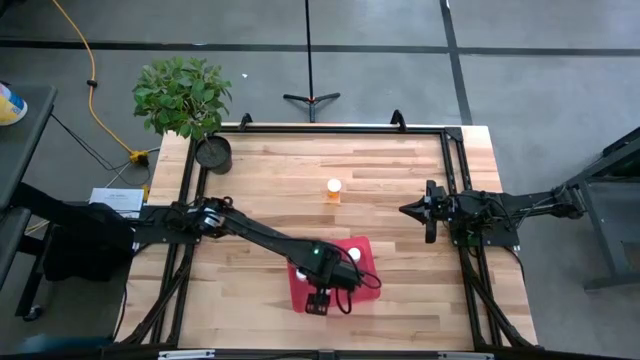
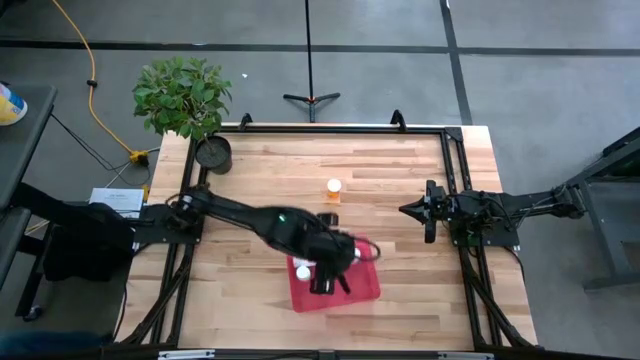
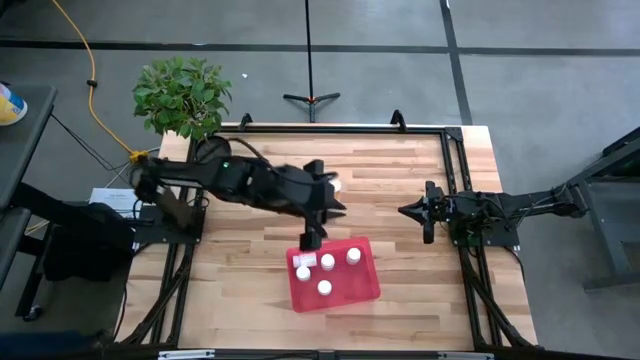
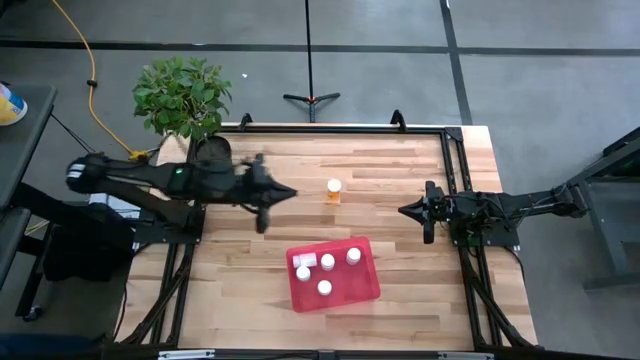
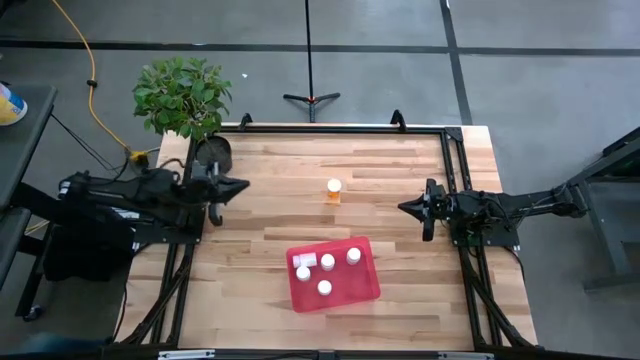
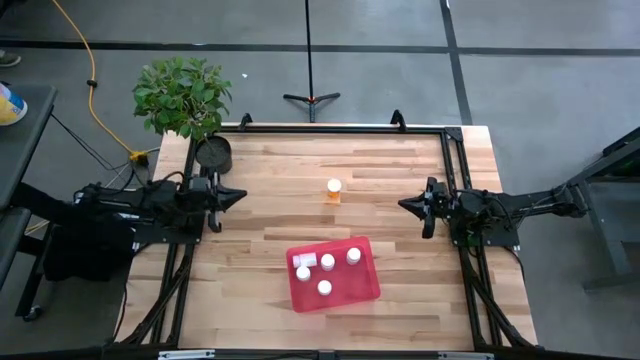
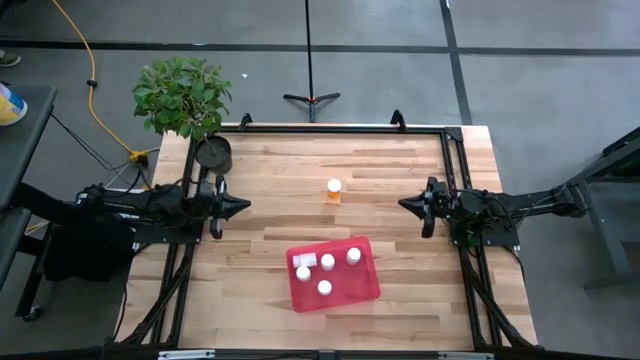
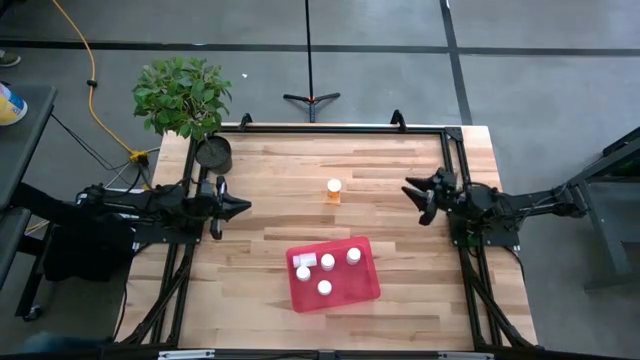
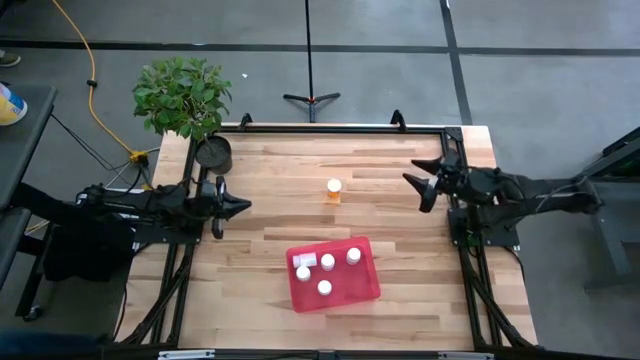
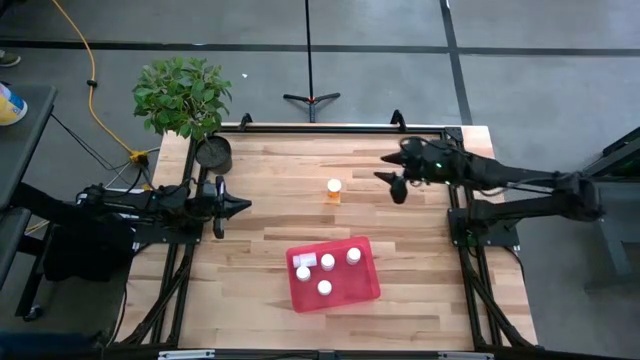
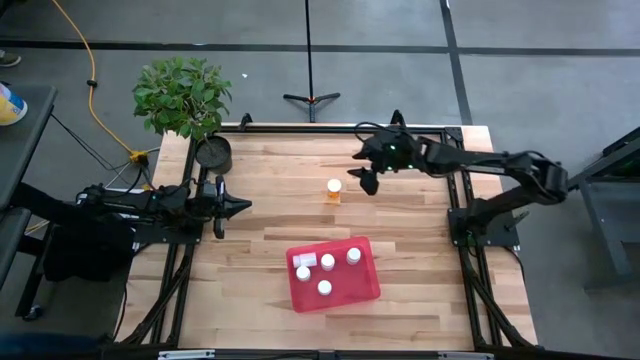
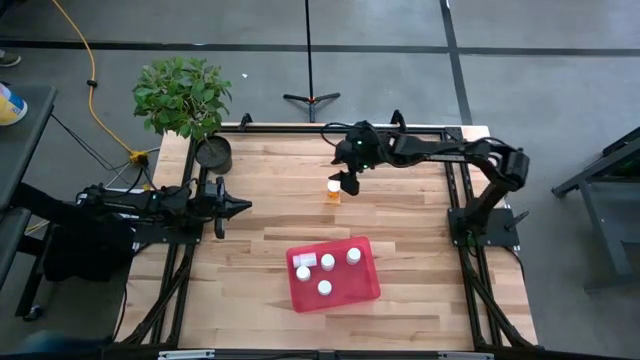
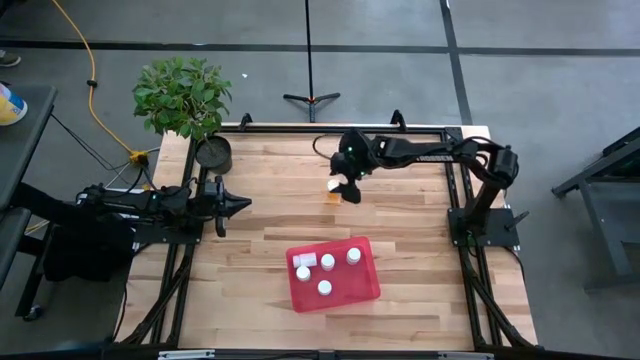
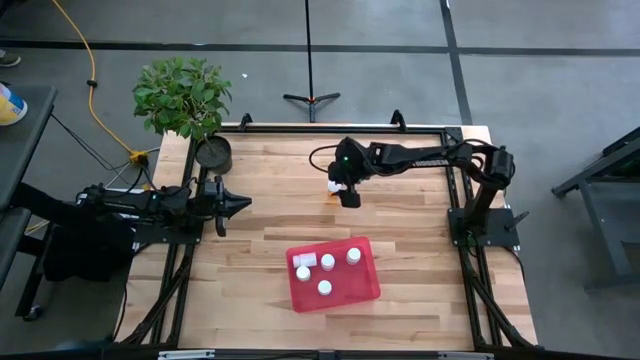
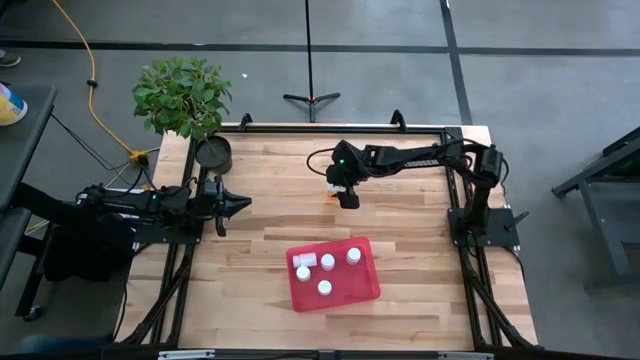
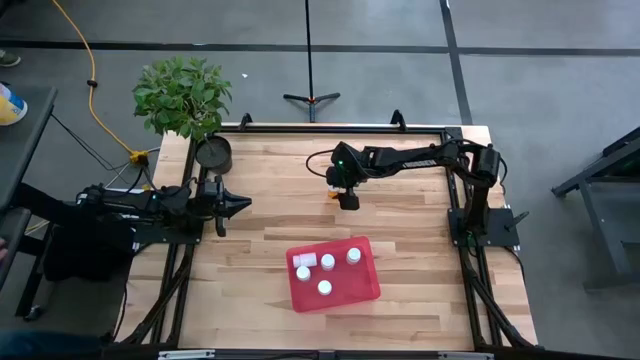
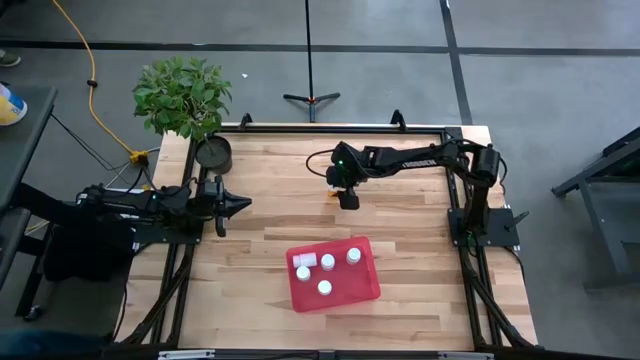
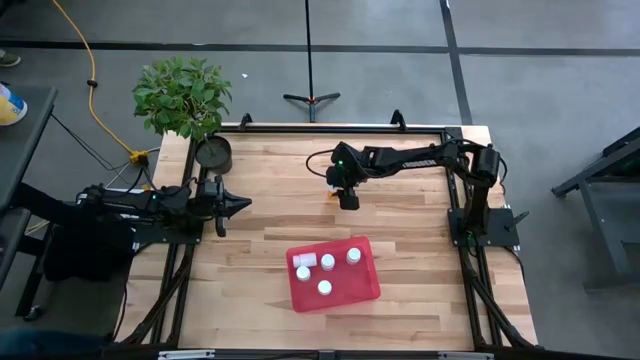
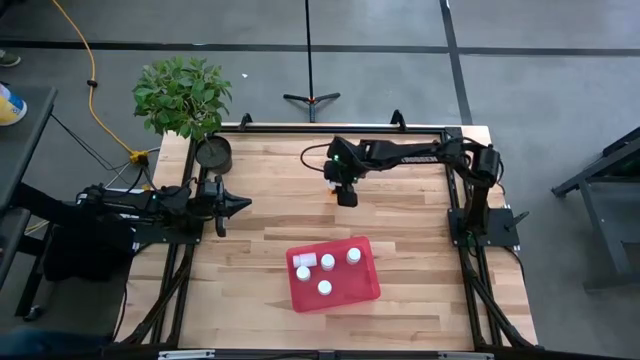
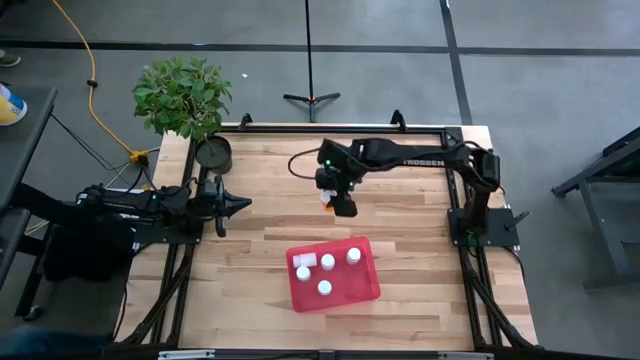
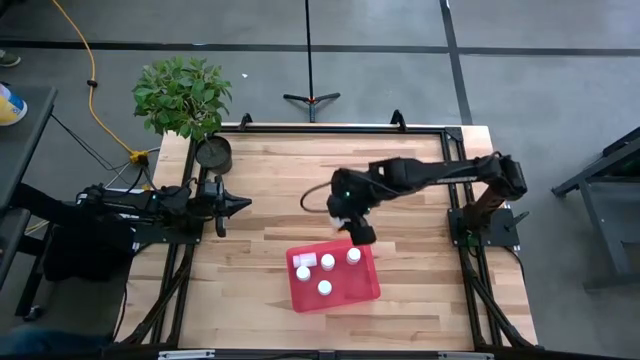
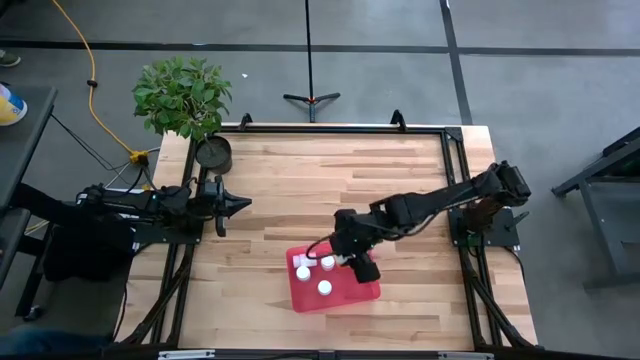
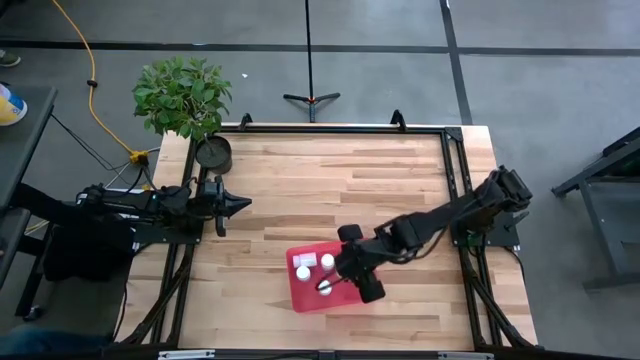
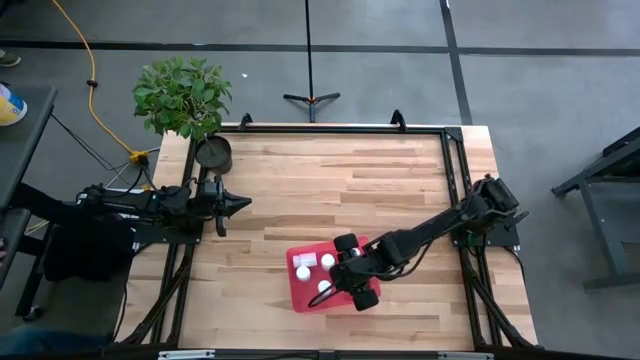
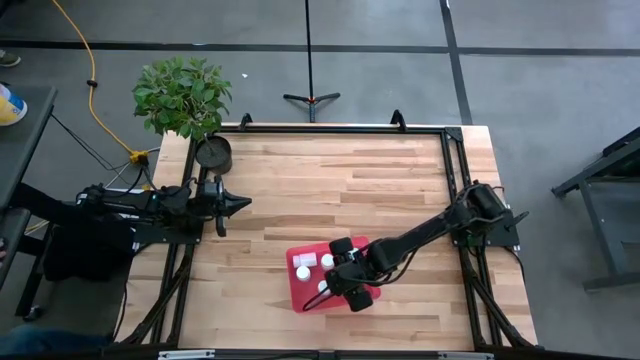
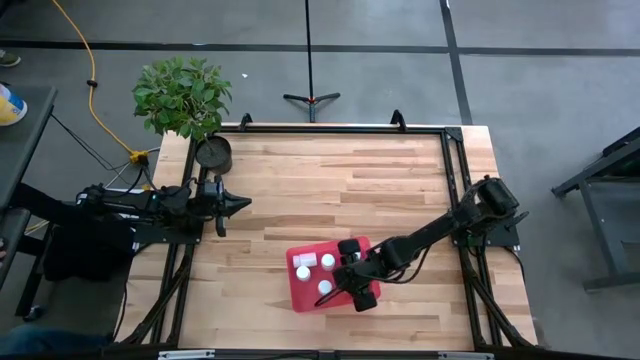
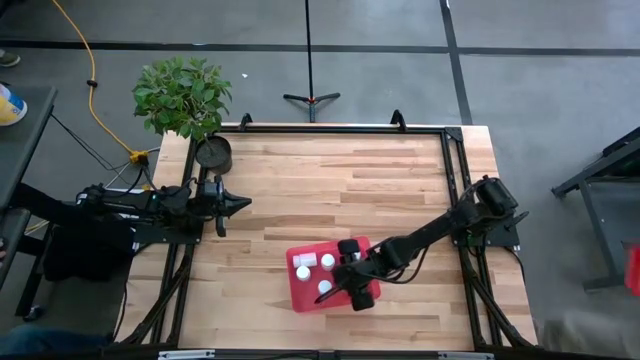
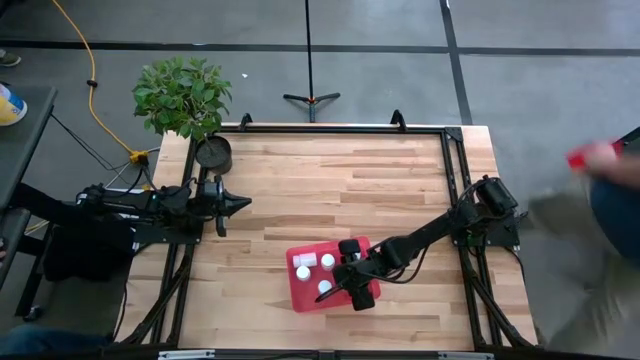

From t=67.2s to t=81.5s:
Task: Pick and place pill bottles into a basket
Put the orange pill bottle into the bin

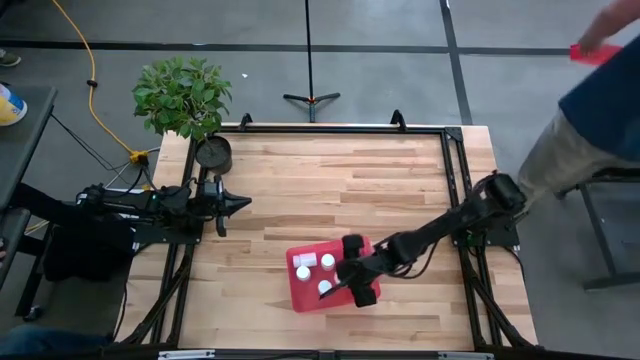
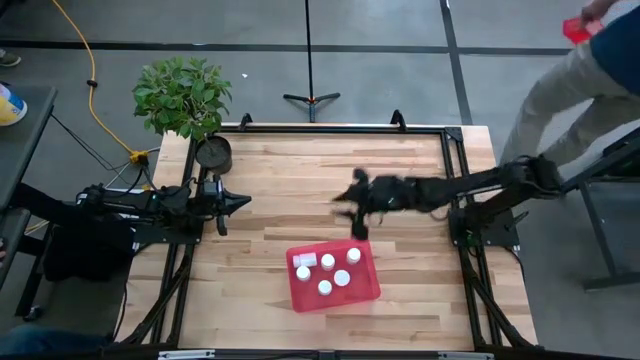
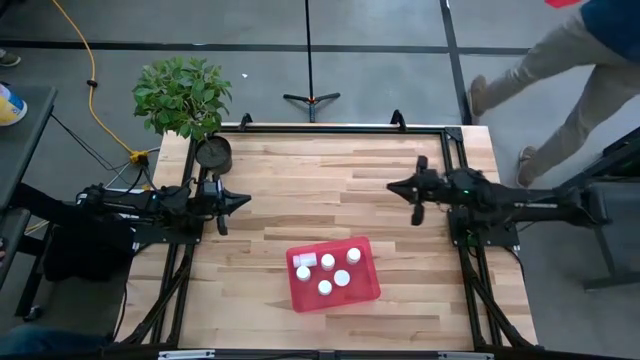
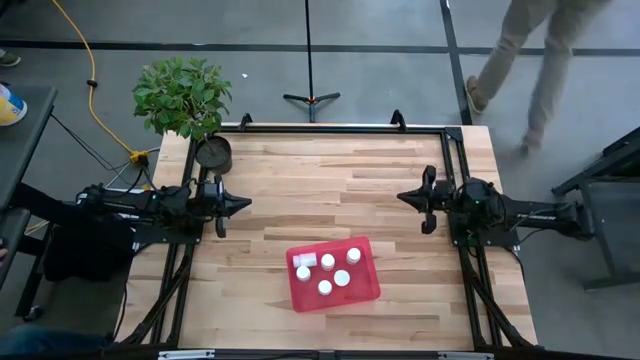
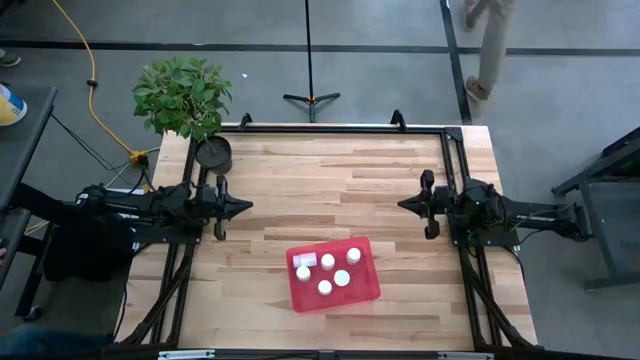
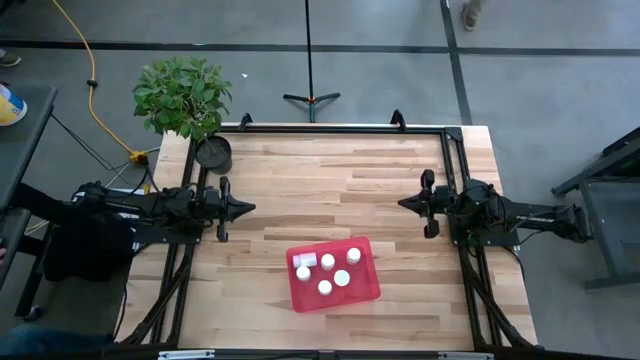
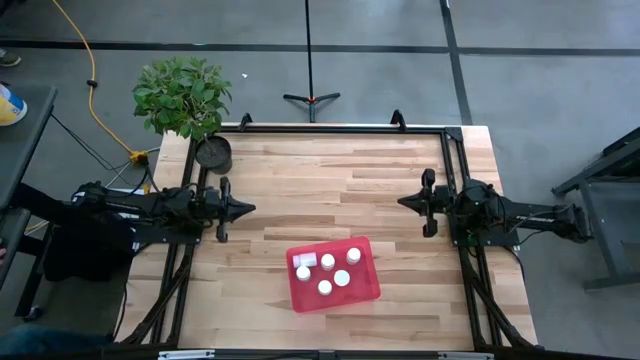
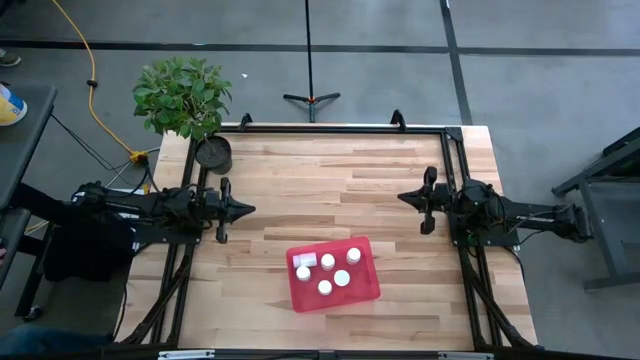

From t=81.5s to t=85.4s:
Return to Home Position
